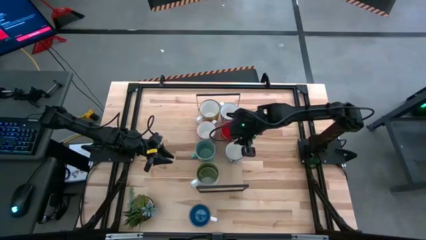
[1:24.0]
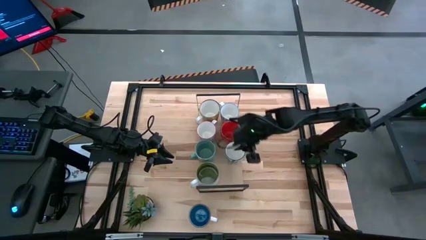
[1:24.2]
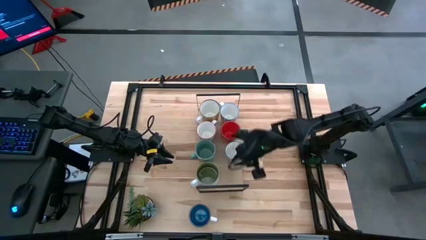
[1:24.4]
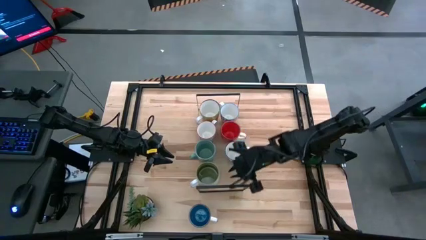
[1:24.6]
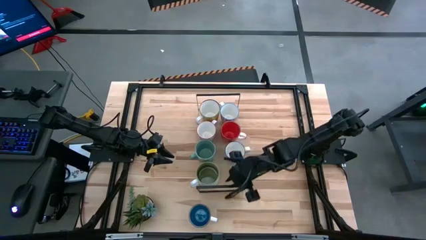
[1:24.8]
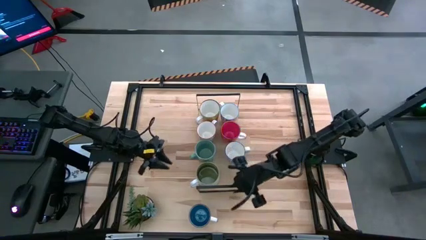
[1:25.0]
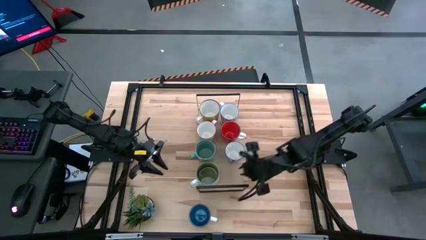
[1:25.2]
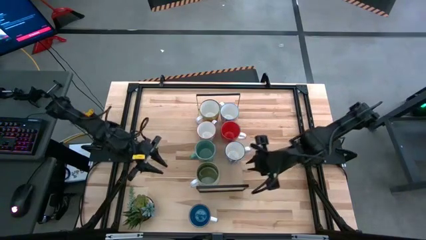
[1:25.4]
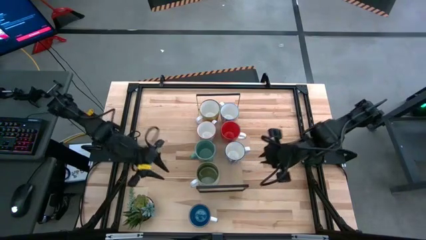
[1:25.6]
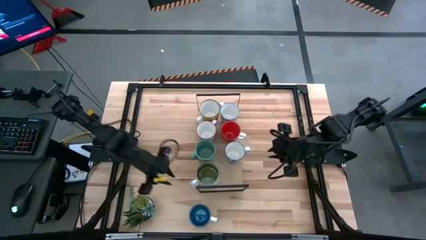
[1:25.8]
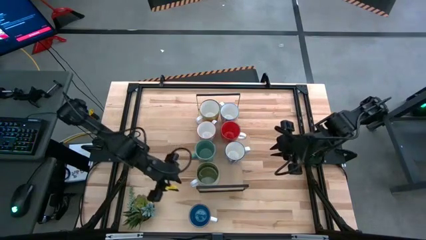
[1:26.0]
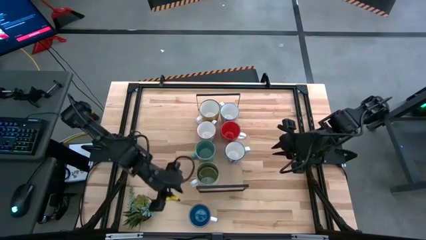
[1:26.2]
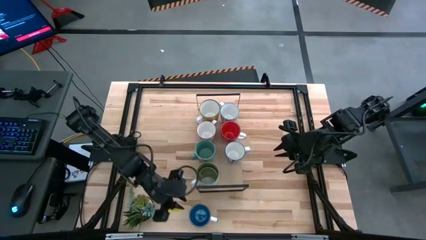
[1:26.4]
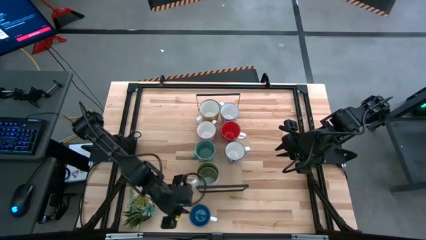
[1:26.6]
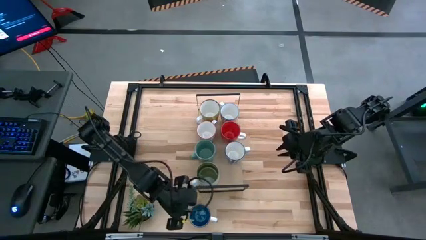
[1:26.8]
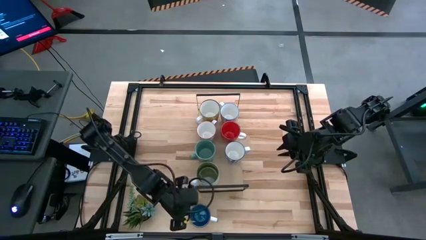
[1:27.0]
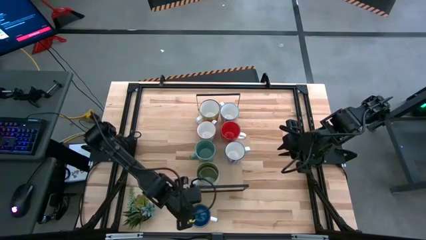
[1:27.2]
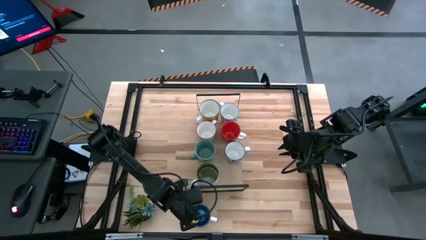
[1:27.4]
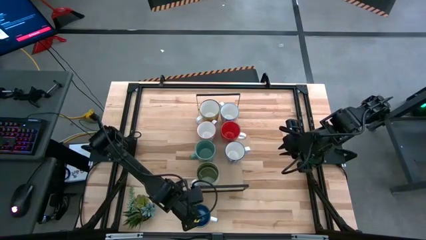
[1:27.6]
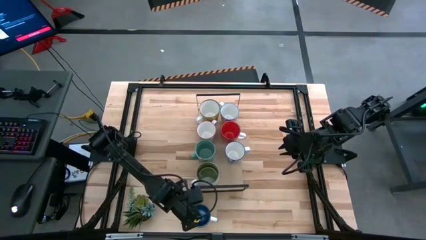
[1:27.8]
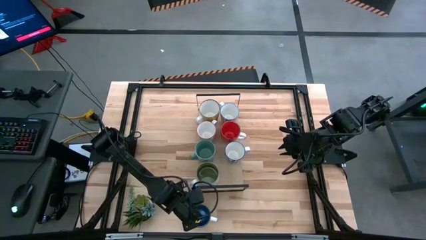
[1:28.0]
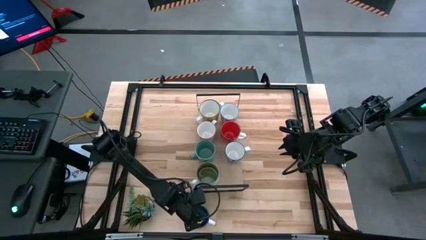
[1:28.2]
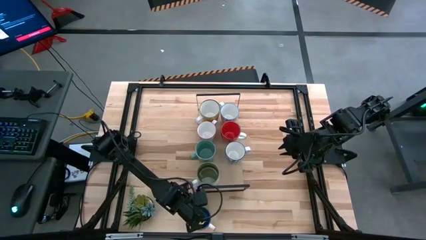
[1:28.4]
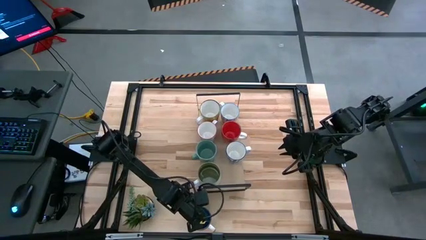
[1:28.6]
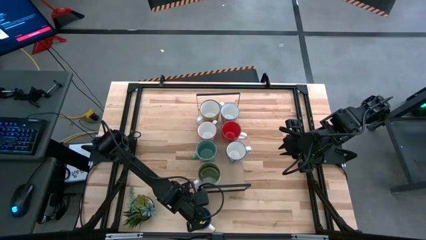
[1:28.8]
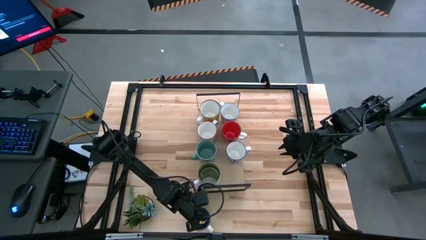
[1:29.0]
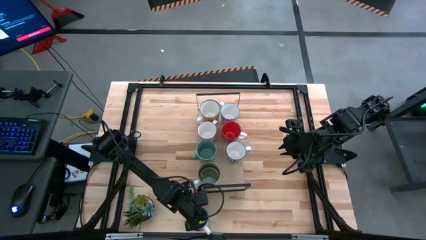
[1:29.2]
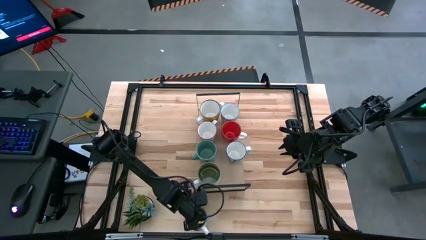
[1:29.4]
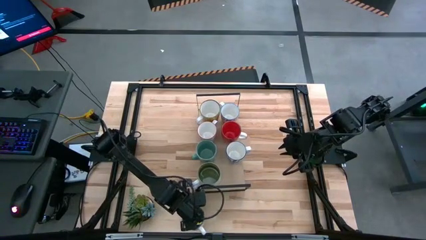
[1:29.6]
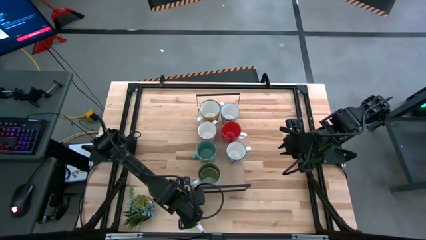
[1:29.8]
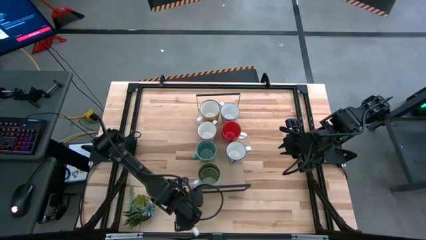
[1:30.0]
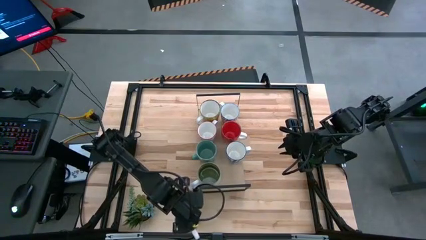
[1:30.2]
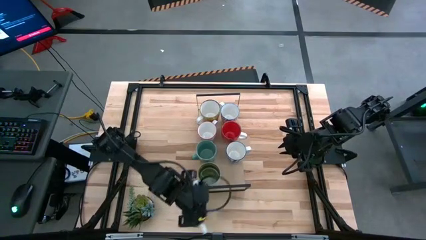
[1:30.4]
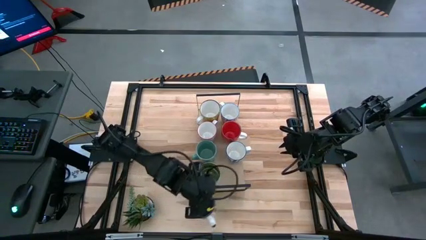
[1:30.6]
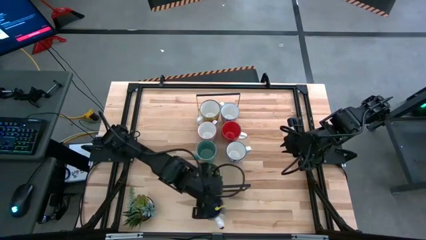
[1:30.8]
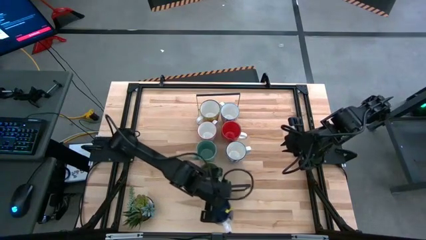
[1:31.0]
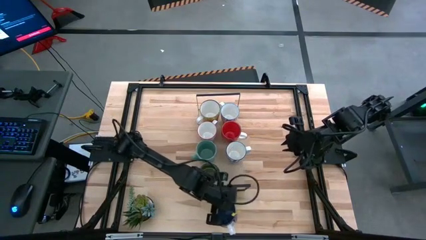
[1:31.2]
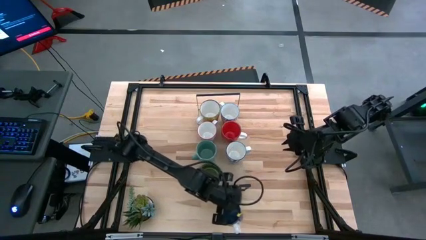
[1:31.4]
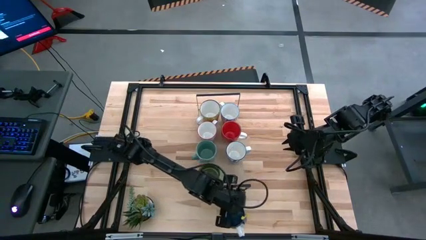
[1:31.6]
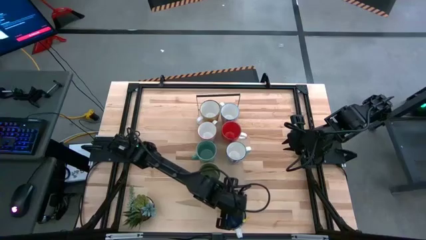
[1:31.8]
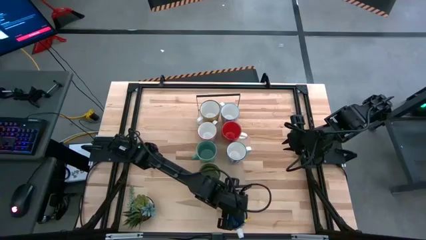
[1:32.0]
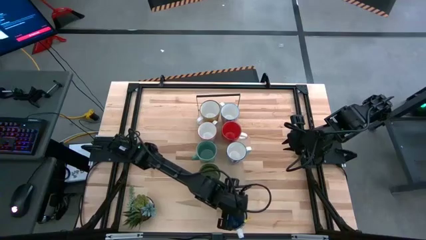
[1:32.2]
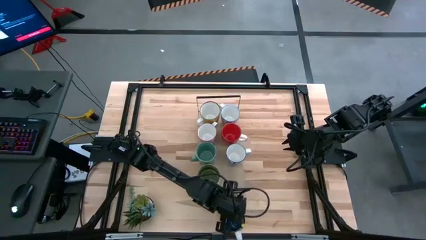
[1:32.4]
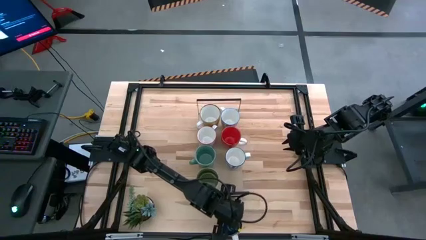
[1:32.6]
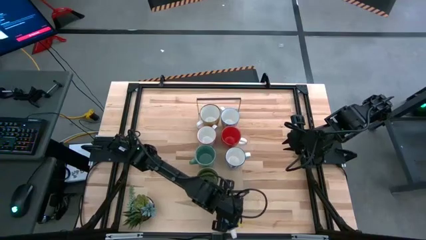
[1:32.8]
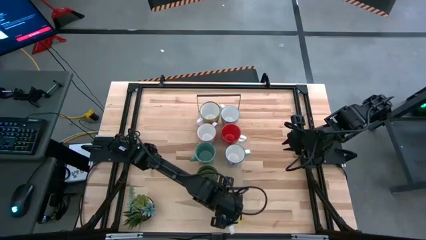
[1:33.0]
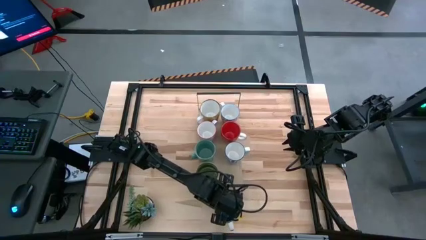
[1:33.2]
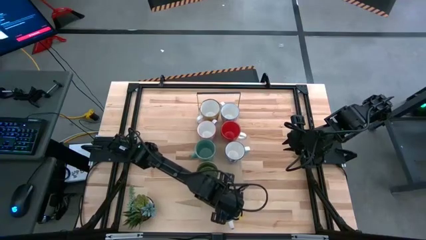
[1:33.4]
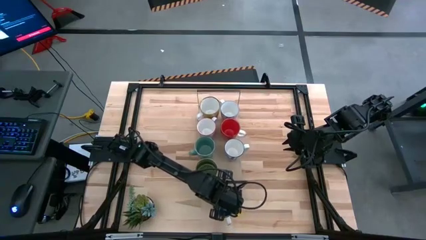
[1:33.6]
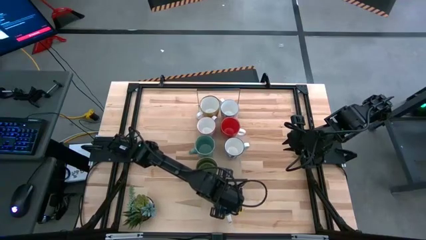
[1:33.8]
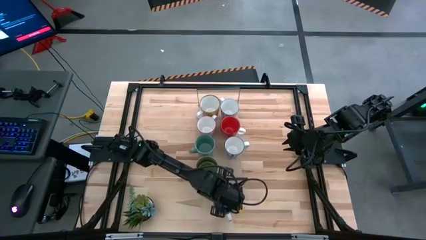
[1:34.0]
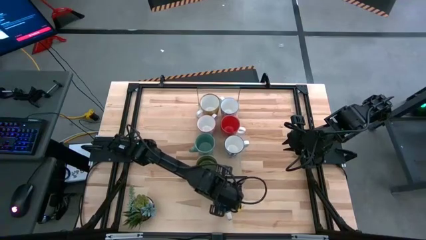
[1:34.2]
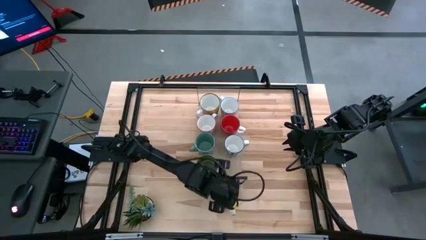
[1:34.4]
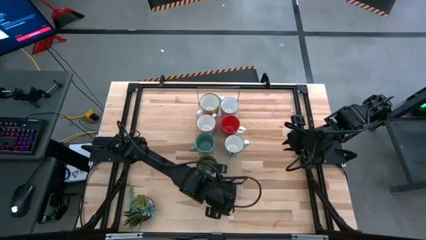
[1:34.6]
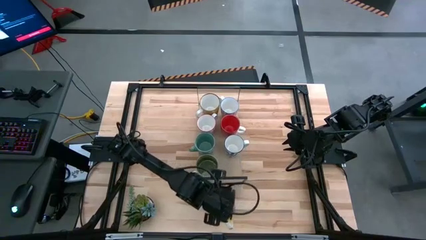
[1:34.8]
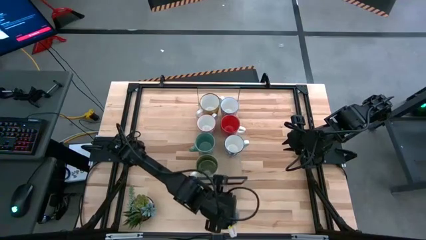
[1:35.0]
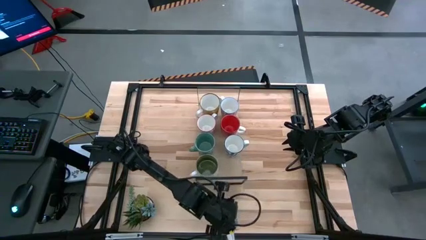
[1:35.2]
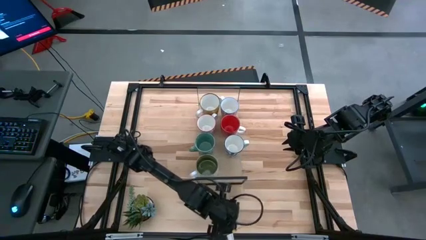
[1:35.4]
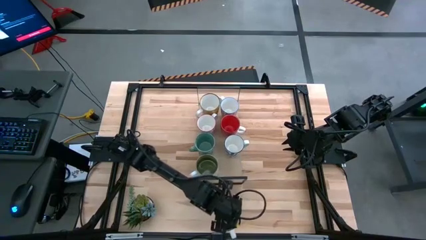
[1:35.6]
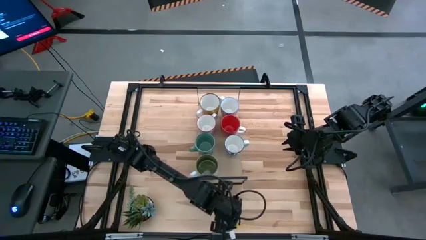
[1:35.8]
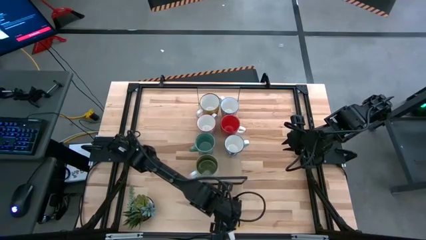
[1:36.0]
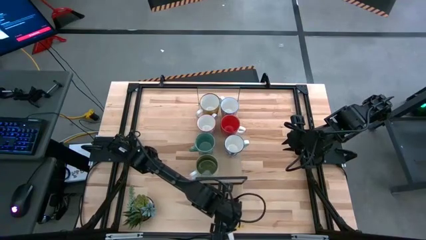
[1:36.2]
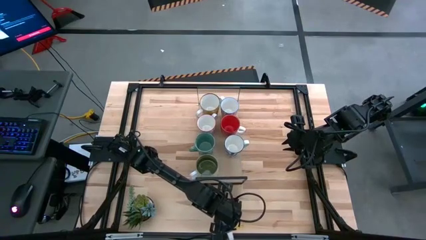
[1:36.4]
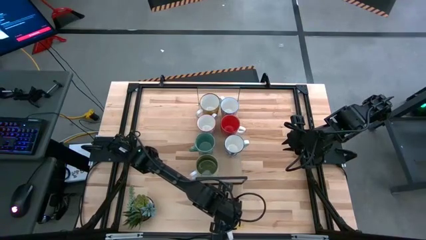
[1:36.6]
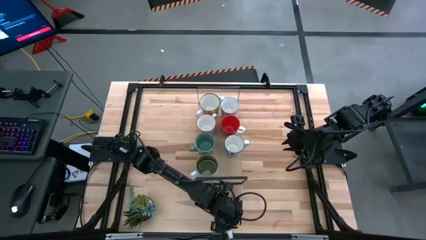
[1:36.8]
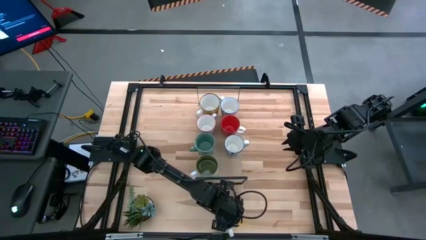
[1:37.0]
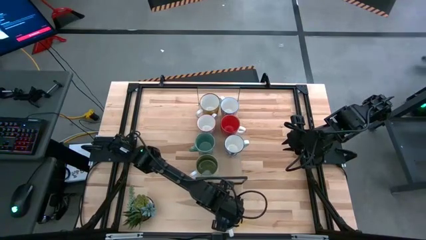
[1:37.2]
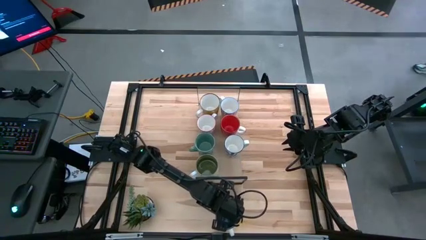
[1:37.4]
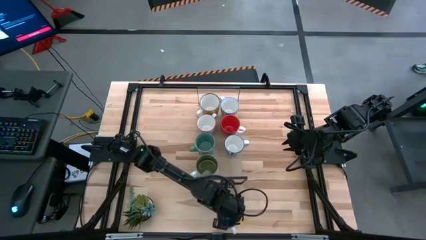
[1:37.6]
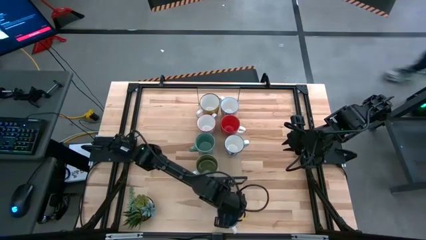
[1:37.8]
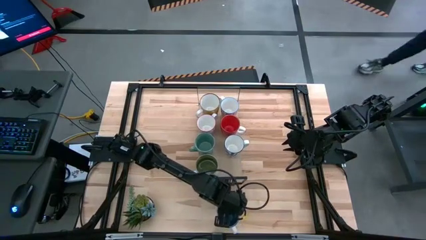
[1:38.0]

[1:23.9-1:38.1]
Task: Place coffee mugs
Put the blue mug on the shelf

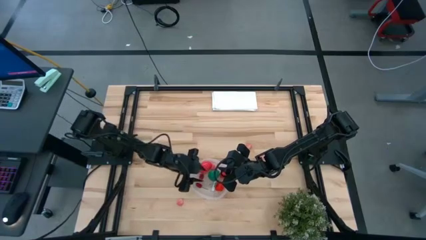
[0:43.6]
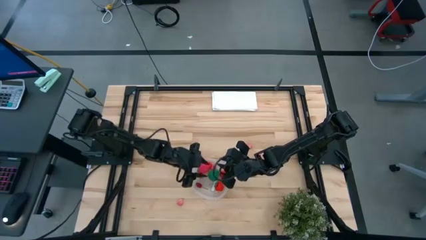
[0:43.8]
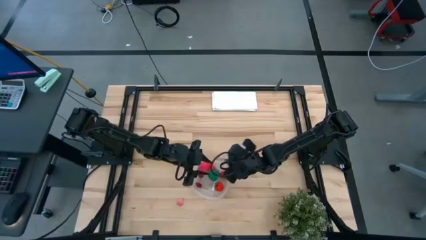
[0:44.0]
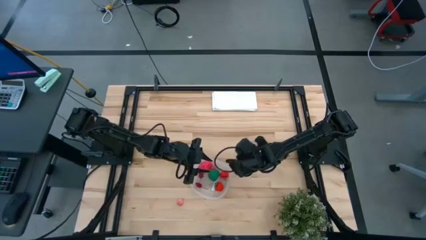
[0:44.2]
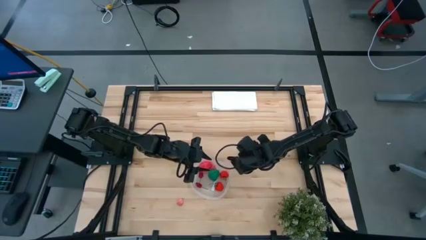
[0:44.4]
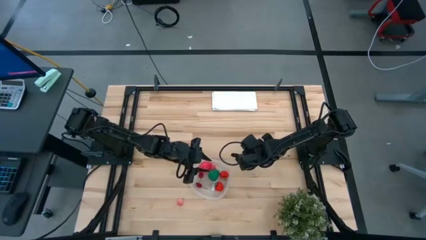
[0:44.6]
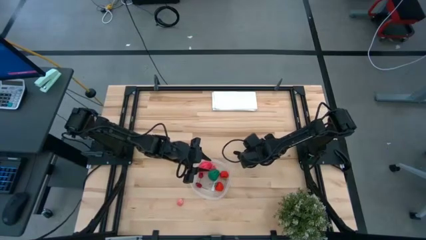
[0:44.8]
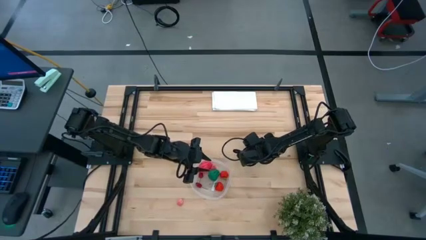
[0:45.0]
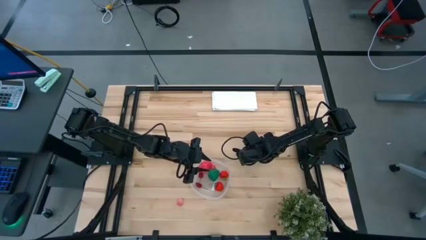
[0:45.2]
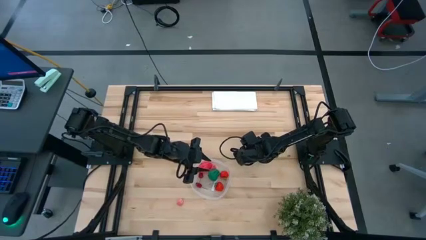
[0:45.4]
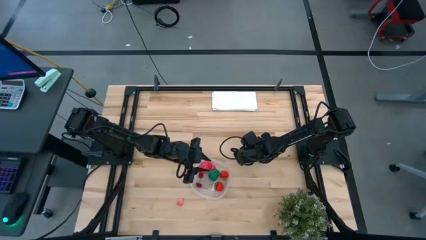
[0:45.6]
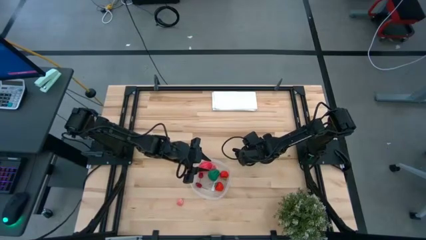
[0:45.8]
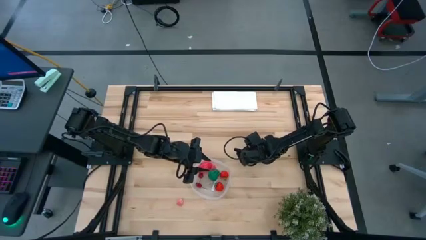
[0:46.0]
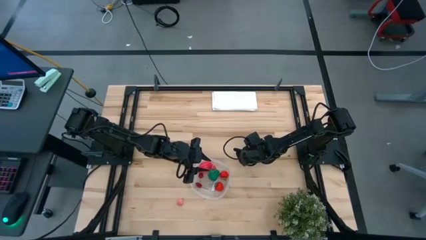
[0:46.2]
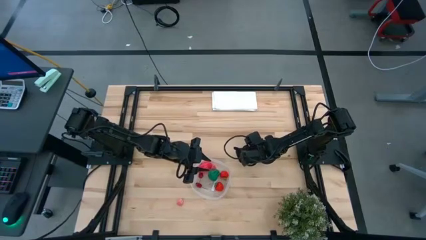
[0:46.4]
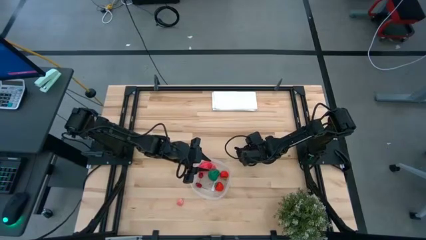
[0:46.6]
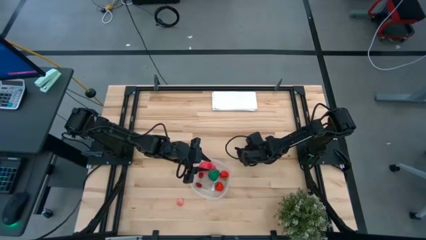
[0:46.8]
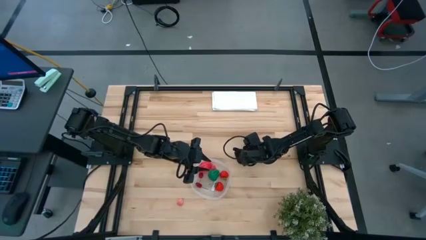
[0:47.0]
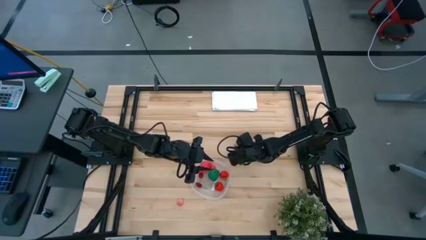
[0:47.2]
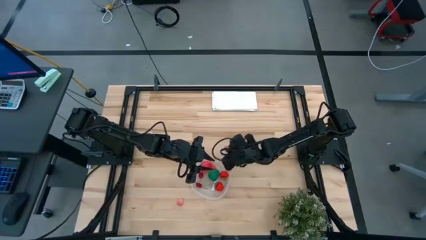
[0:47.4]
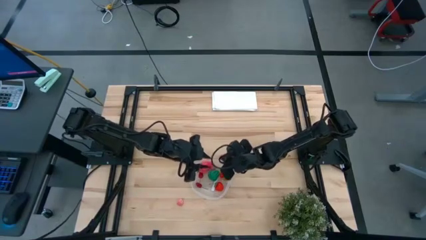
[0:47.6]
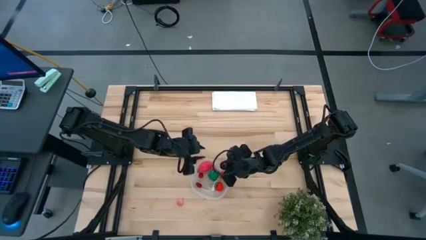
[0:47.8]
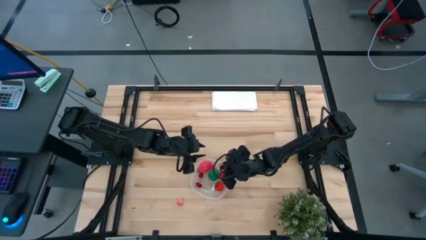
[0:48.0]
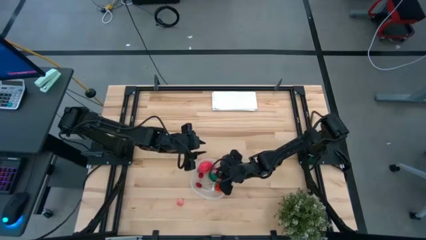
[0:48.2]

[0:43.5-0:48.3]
Task: Pick and placing Produce into tupperware
Put the pink peach into the transparent bin
